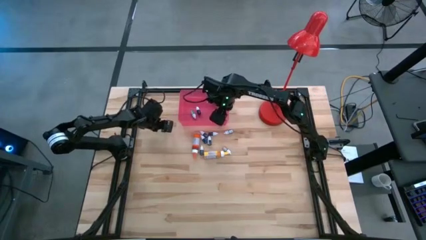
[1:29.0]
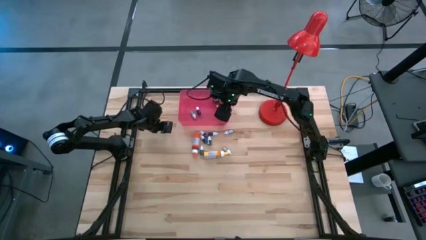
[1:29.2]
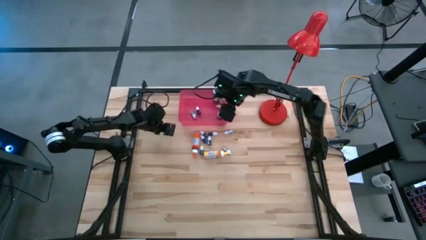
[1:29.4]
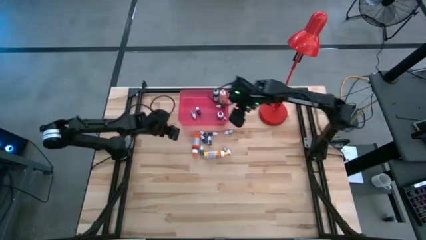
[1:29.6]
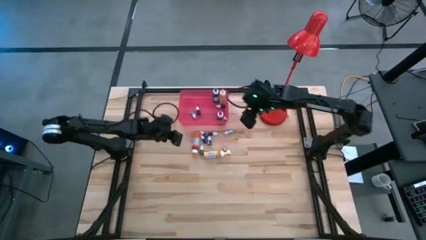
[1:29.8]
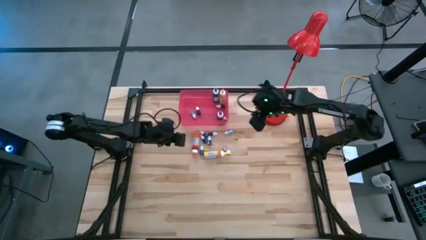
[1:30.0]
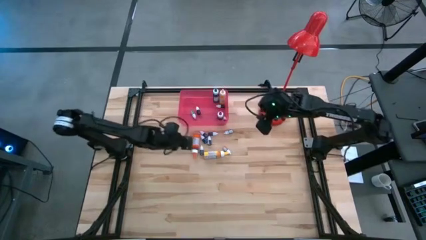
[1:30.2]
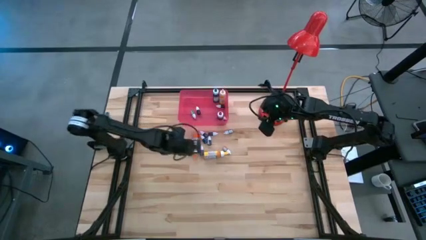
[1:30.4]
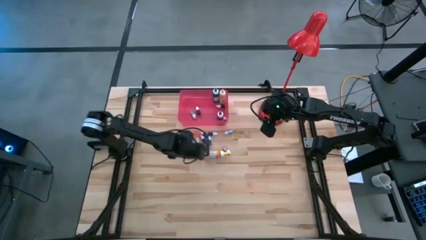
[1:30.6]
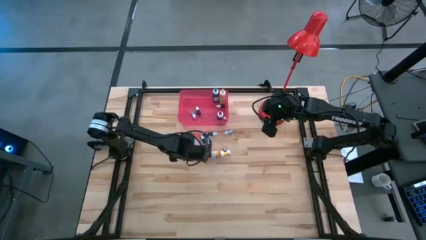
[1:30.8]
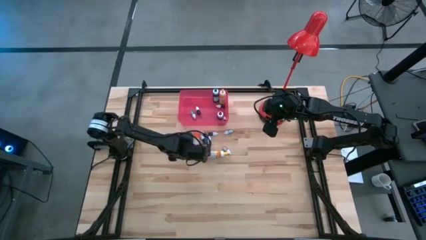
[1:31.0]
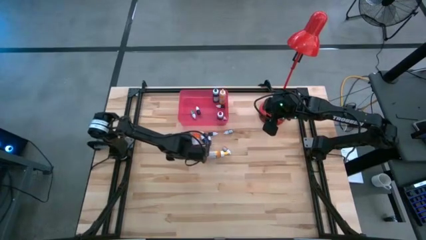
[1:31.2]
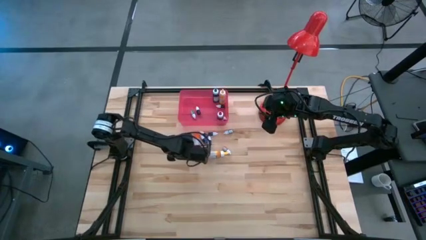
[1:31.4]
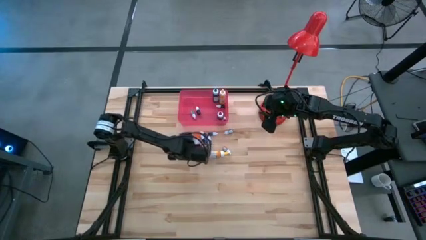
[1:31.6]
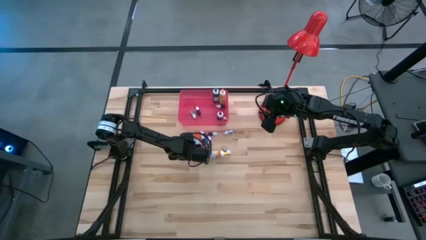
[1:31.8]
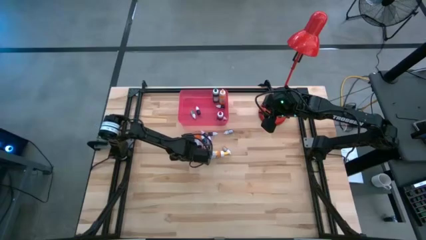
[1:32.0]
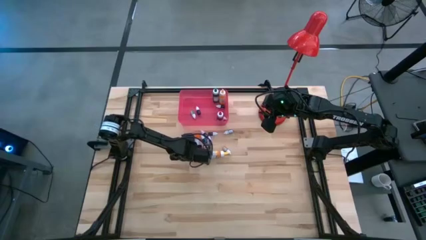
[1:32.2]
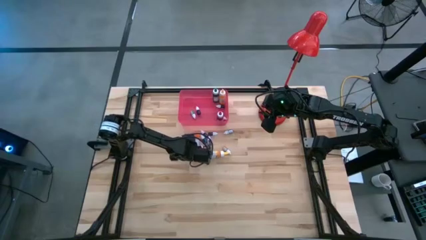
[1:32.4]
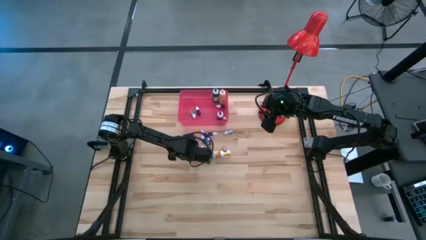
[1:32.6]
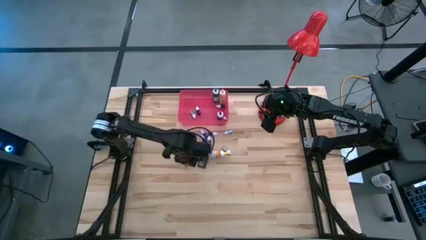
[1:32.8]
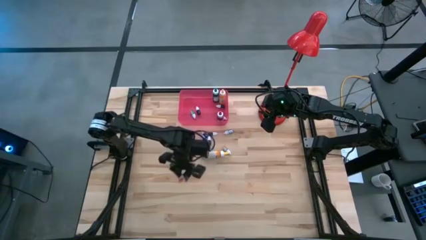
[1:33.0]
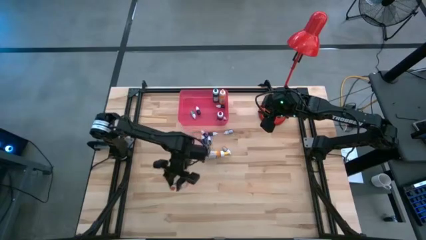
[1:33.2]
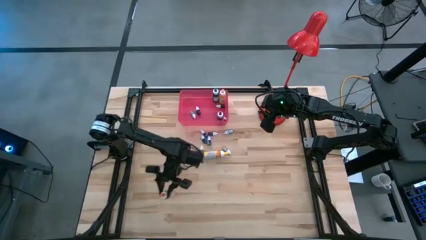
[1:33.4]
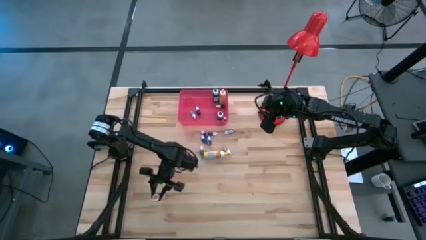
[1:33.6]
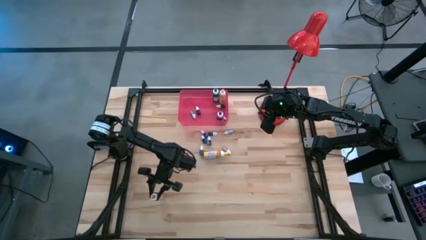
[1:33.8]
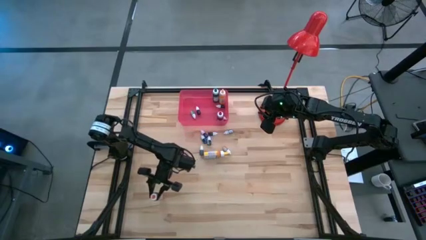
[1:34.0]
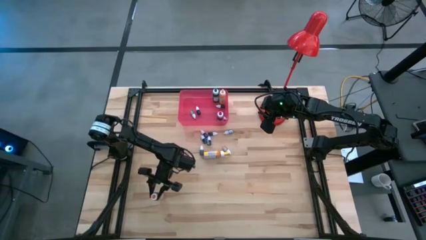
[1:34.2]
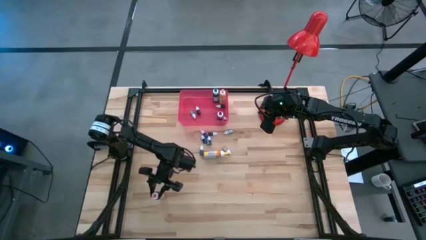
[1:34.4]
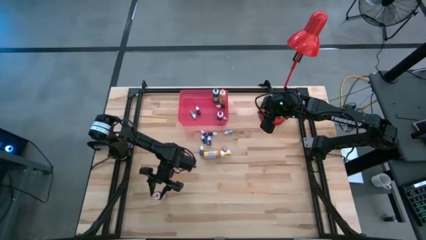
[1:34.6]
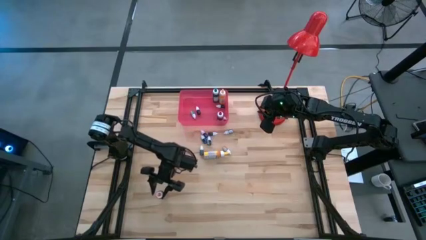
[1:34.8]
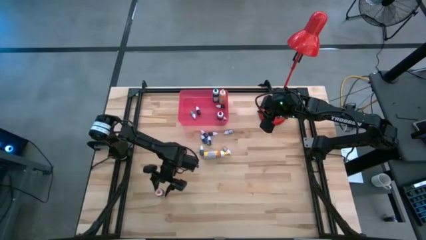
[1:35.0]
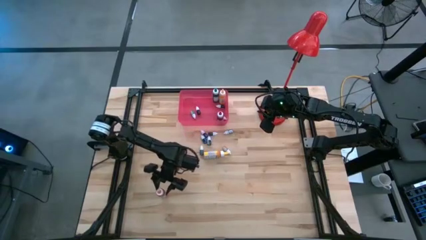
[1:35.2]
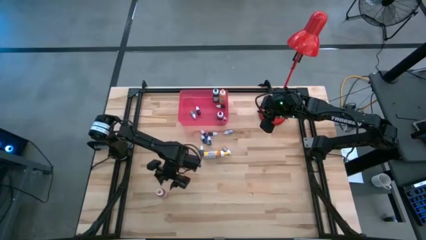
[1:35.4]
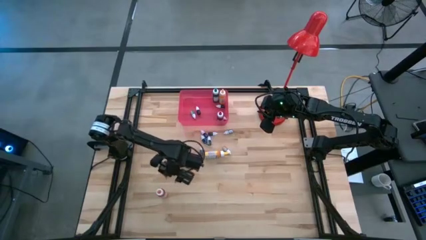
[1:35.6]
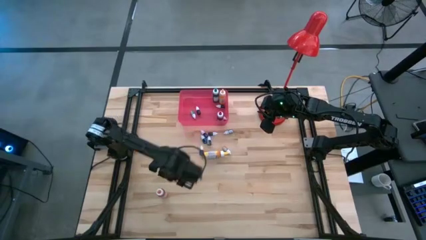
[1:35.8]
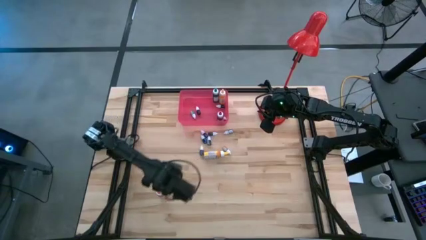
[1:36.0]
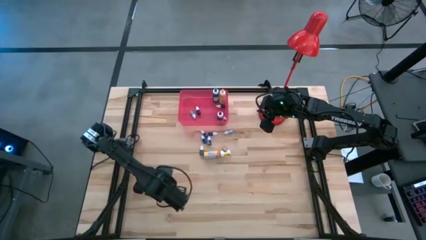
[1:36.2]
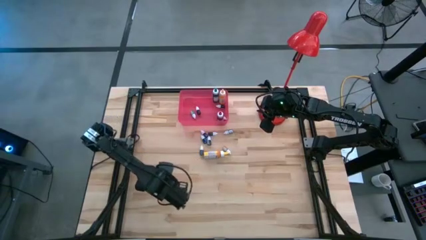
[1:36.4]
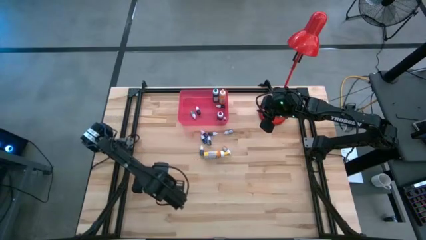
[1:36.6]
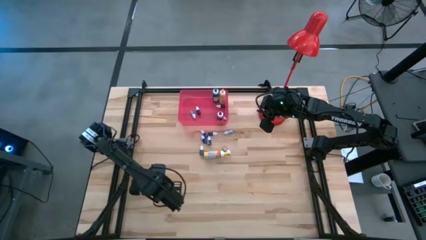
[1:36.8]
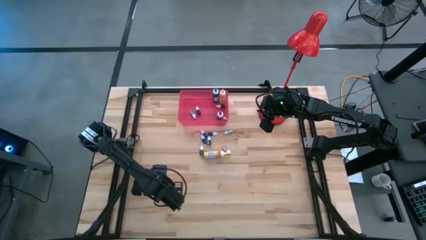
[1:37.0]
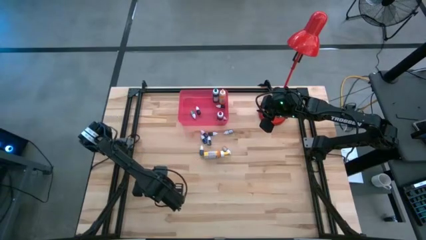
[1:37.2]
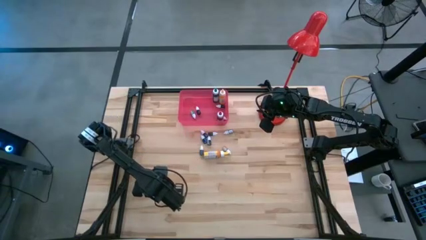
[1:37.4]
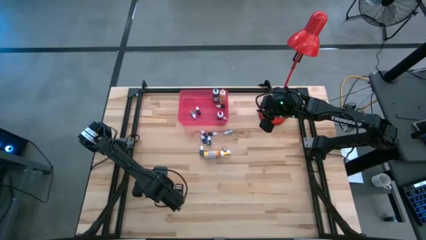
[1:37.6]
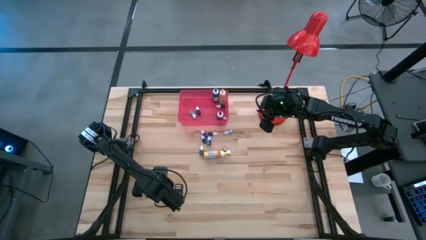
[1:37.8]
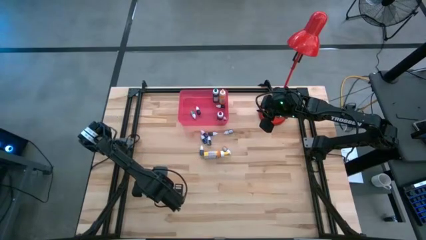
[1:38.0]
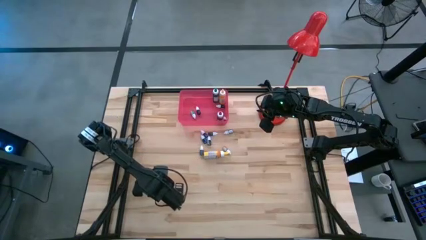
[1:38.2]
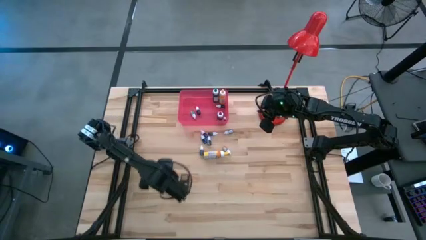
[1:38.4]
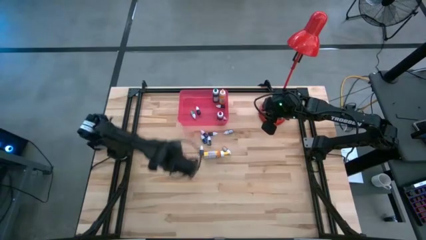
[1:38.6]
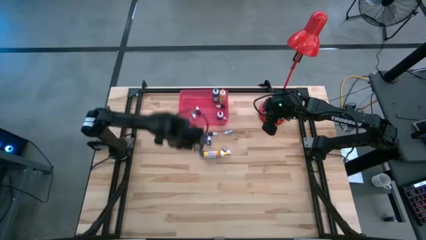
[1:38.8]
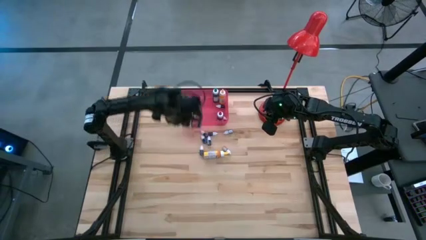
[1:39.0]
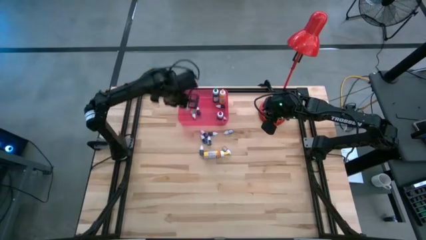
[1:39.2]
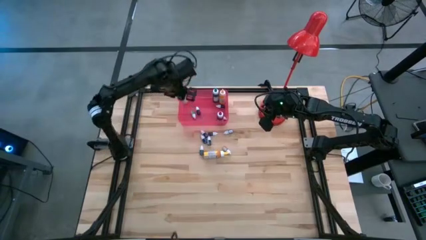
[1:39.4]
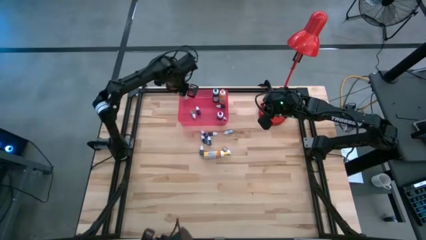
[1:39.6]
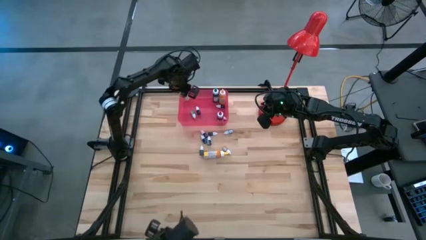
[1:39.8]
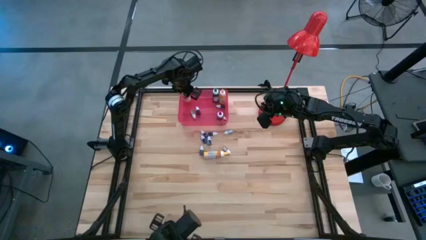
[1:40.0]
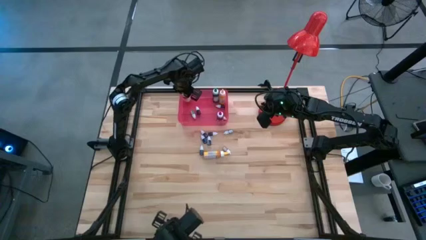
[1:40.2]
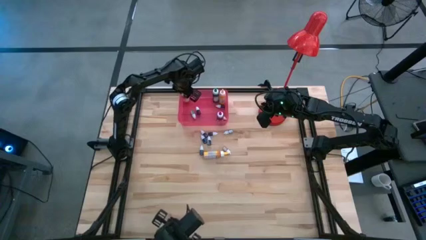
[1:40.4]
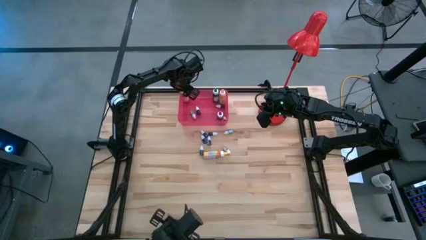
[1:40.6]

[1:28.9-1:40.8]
Task: Pick & Place food coloring
Put the big orange food coloring bottle into the red bin
